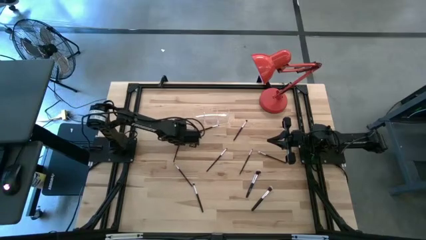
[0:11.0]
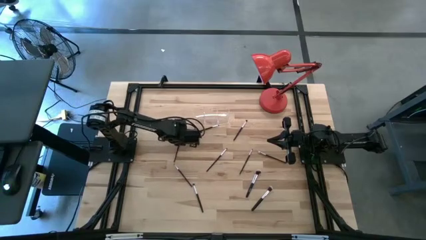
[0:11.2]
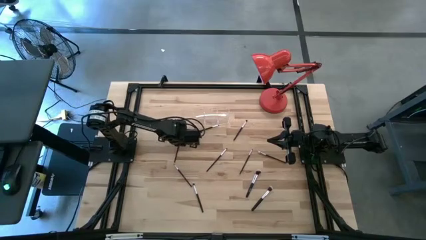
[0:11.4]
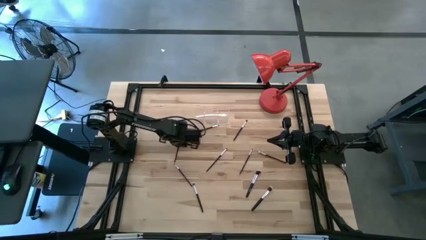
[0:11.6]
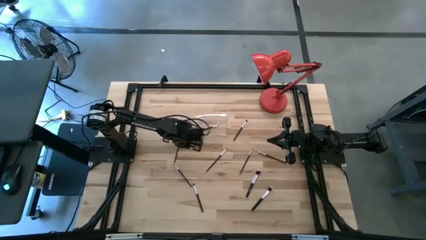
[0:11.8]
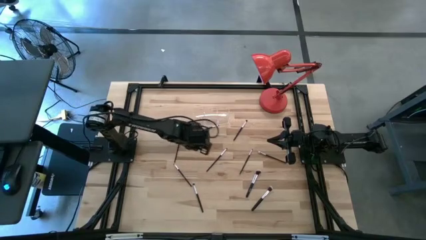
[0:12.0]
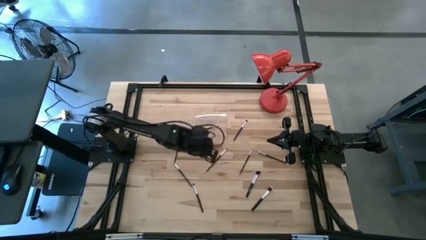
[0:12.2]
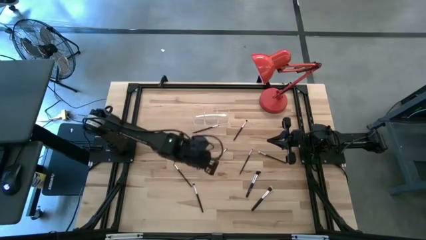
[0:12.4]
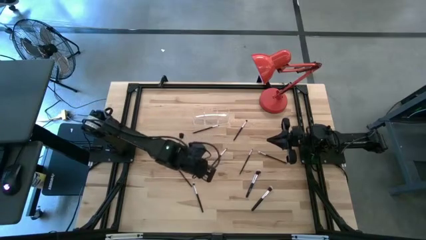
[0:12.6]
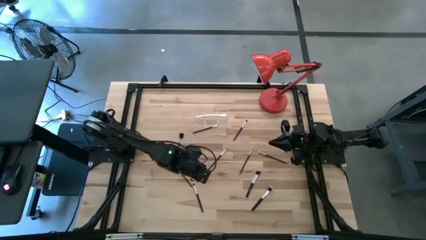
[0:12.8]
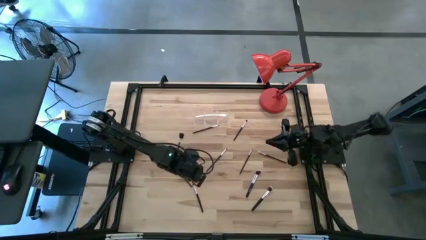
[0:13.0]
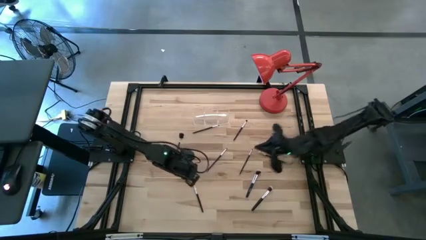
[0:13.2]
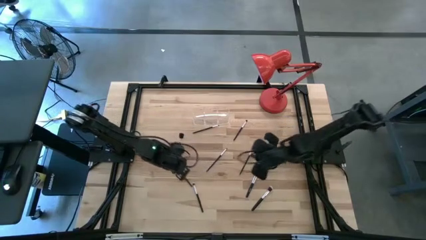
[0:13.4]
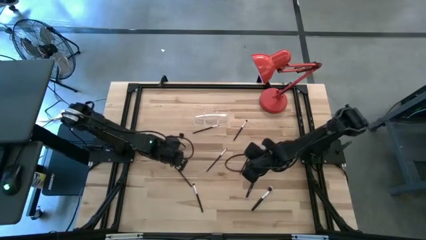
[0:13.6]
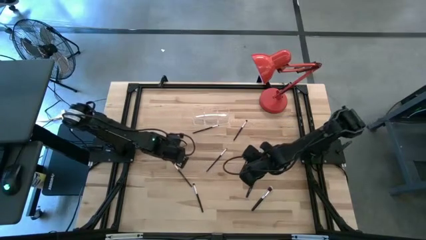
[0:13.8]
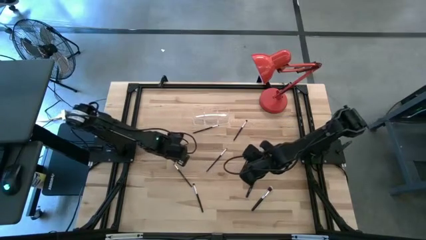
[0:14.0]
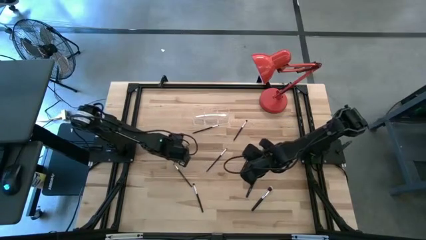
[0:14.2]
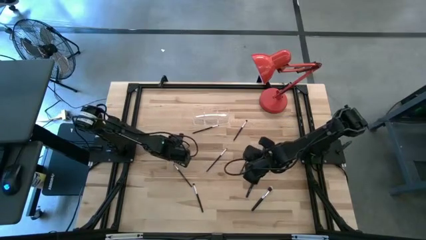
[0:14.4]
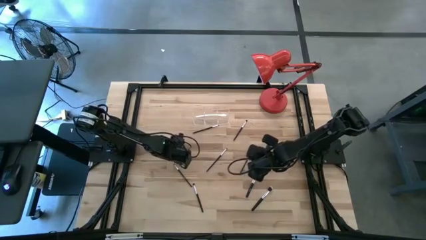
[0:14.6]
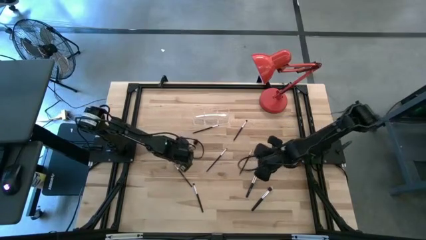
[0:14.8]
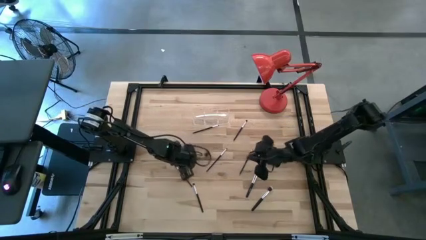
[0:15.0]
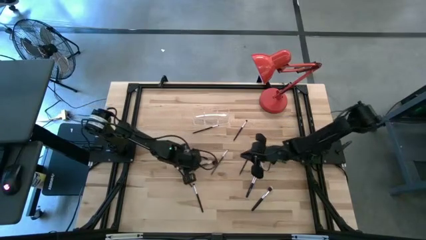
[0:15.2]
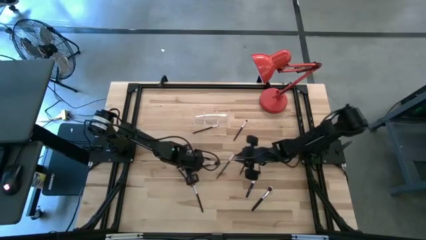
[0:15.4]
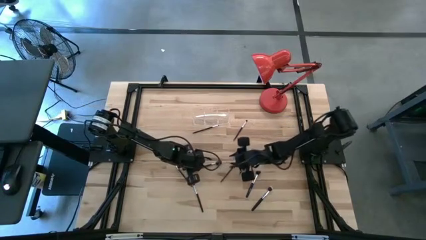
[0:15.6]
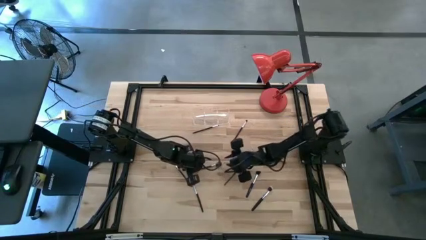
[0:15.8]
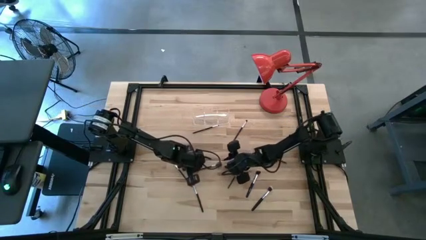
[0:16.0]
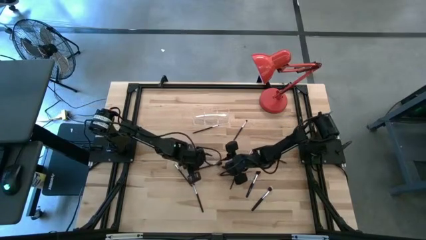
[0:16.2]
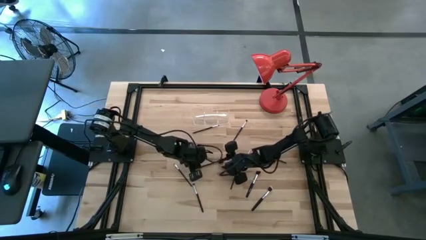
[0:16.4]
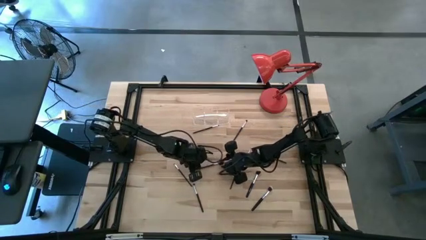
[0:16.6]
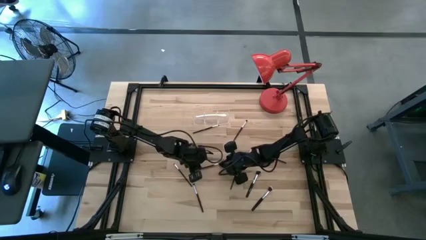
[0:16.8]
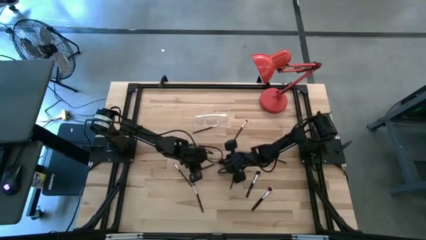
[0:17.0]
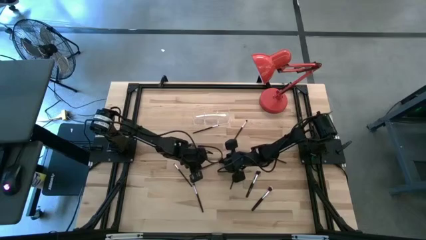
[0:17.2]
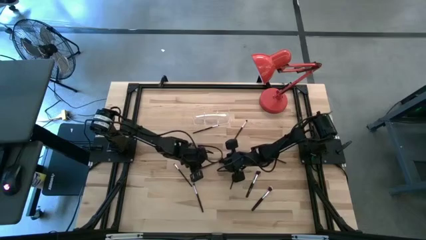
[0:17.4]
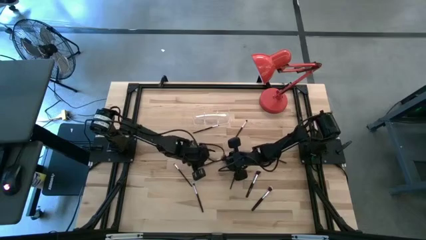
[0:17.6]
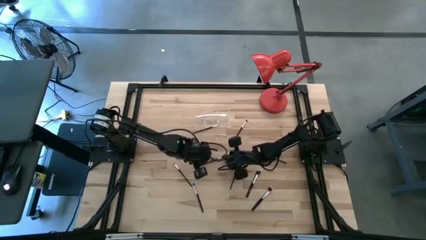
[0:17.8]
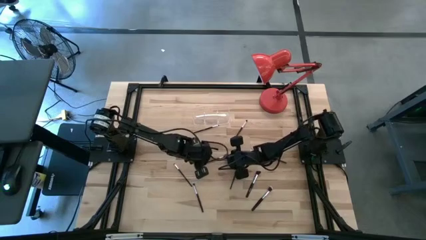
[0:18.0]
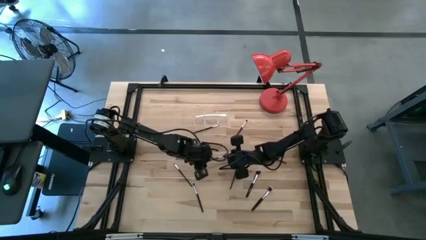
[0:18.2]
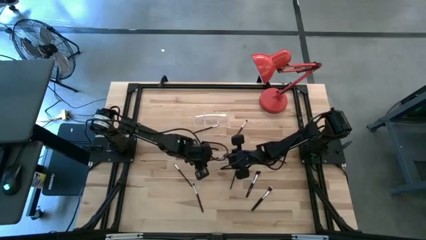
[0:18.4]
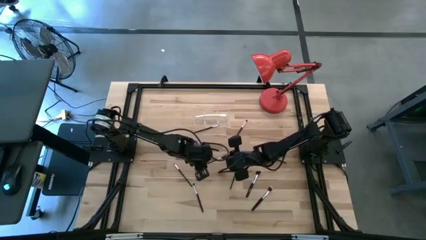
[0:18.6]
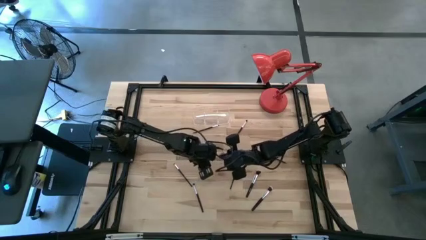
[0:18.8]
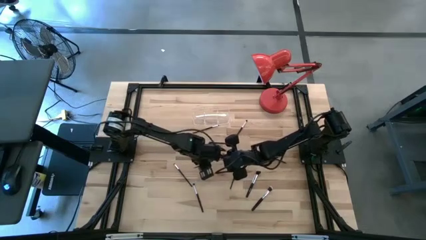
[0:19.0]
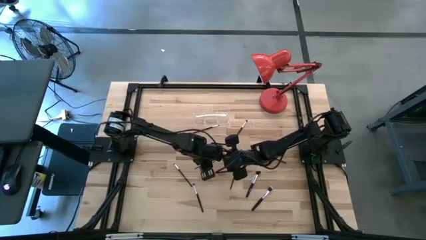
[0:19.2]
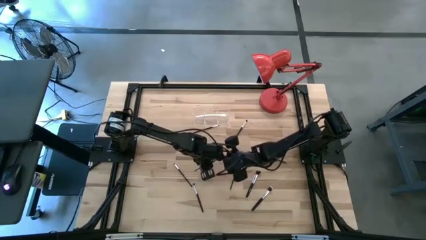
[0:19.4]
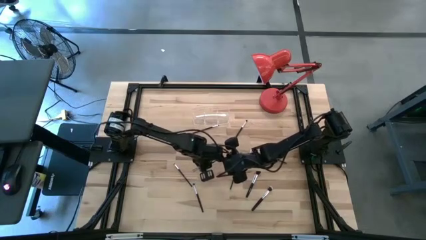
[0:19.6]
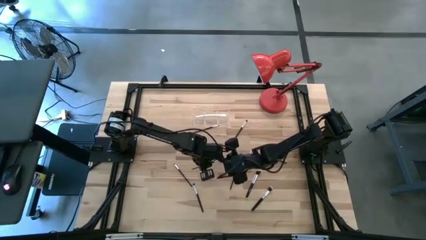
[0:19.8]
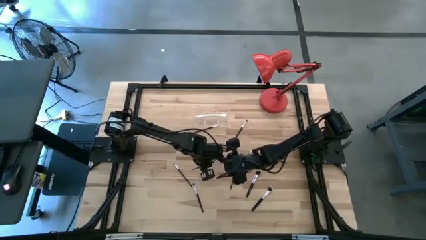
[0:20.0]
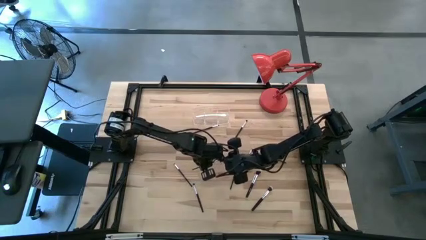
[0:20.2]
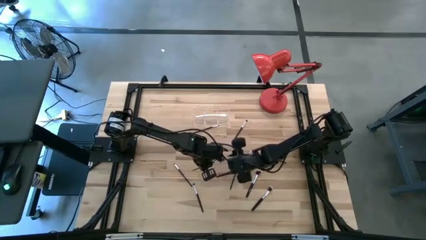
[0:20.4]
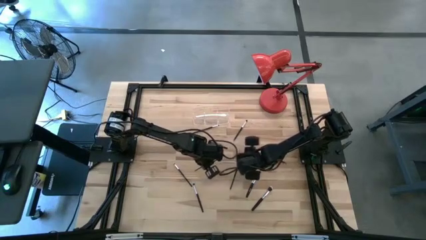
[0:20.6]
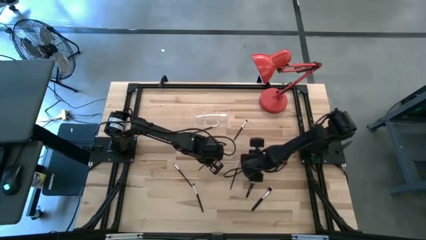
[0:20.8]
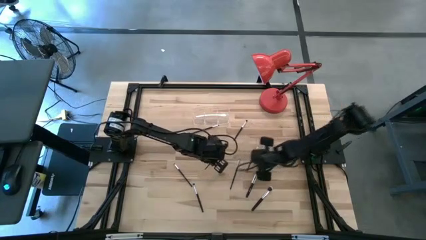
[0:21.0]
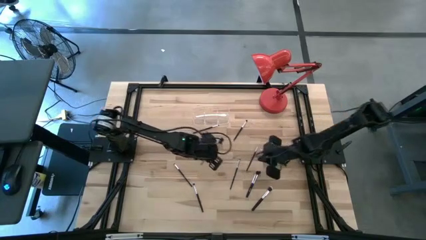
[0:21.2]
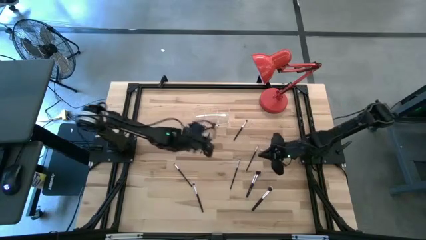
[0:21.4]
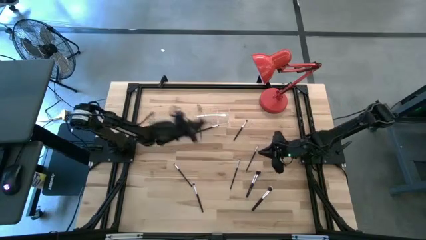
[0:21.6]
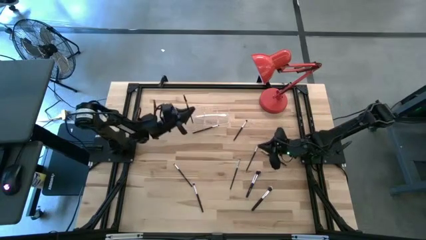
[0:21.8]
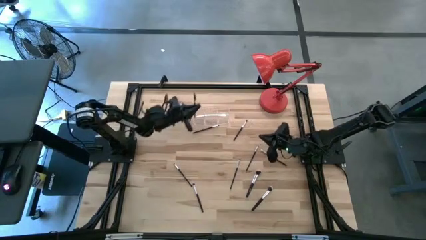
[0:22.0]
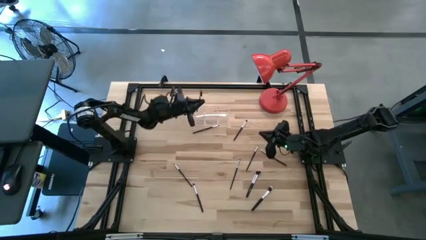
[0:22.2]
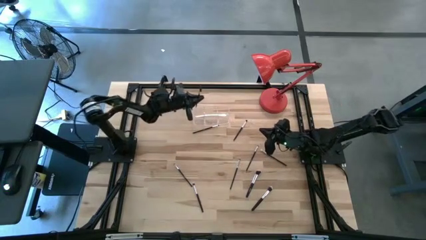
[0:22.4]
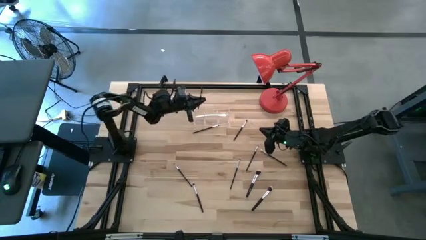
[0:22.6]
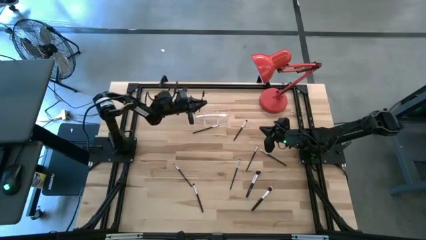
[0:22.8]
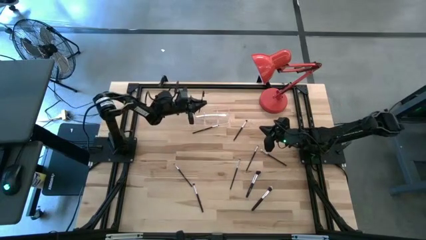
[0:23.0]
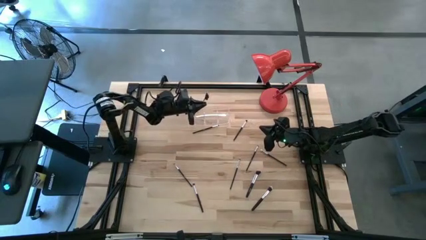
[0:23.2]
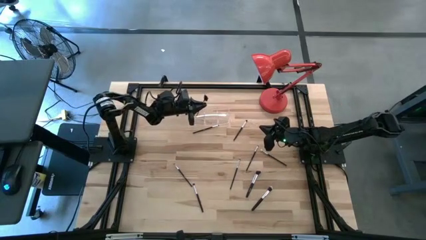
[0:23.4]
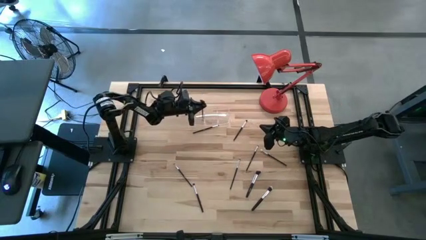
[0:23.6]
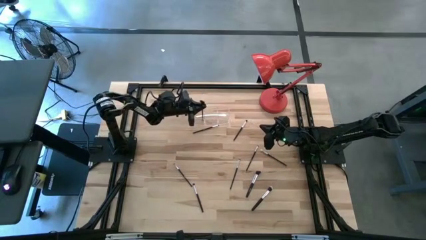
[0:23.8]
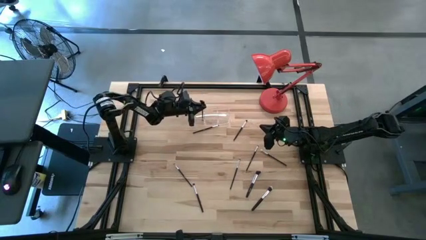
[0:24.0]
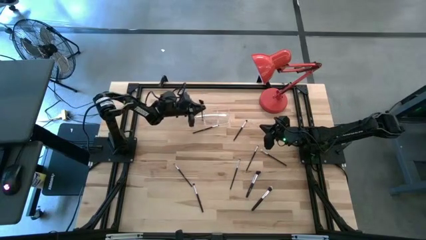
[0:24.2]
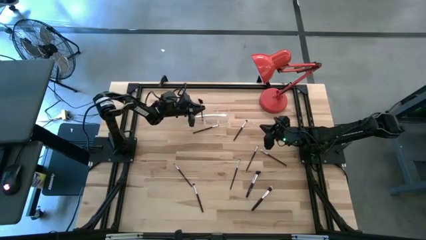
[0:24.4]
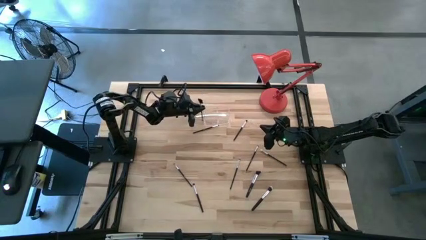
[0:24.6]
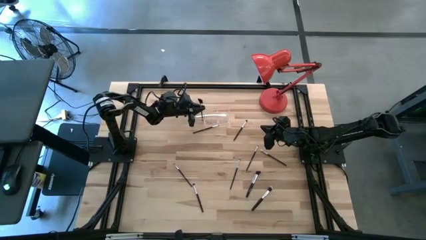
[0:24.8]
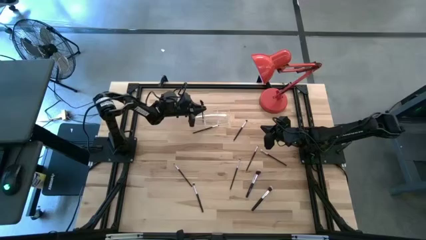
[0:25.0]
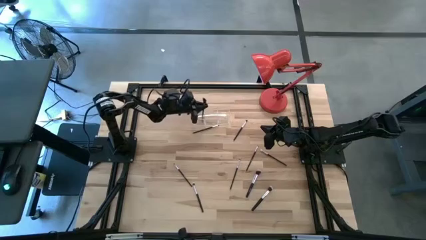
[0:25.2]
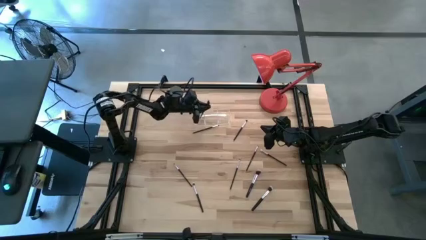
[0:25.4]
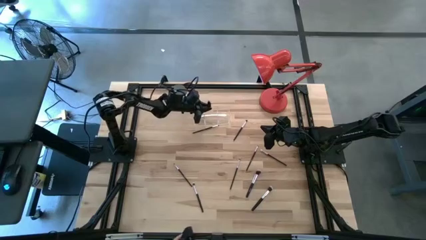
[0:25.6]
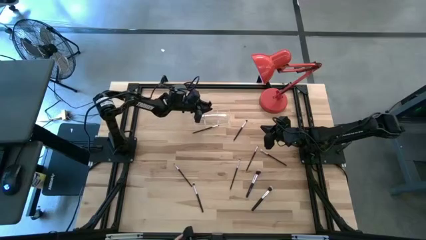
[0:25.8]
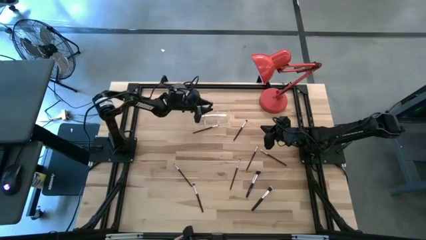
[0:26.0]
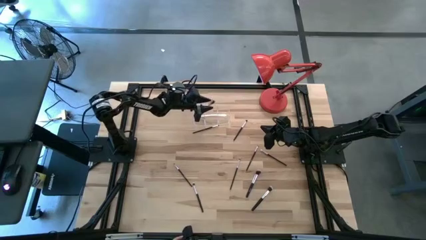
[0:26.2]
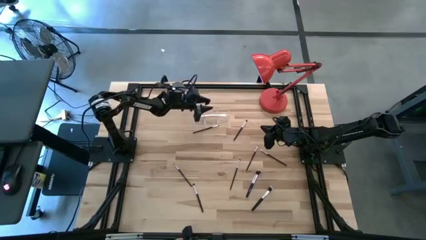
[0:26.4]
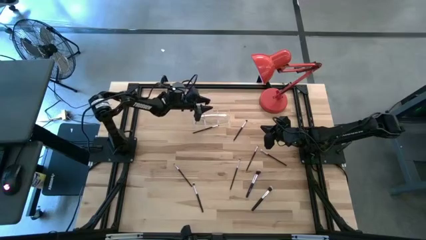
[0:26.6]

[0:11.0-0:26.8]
Task: Put items in baskets/containers
Put the black eye groomer brush into the transparent organizer
